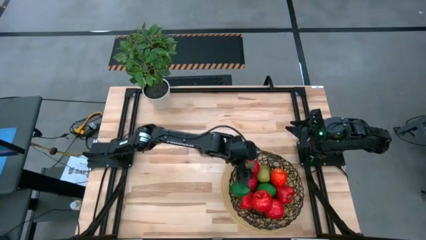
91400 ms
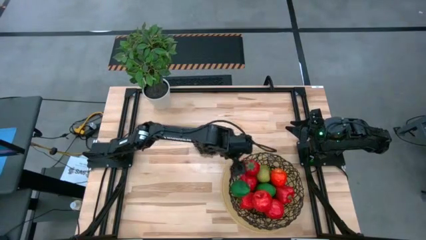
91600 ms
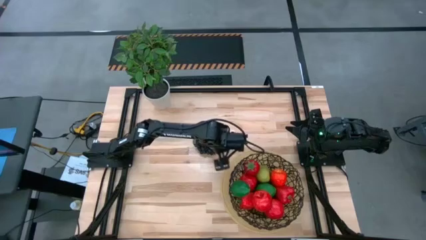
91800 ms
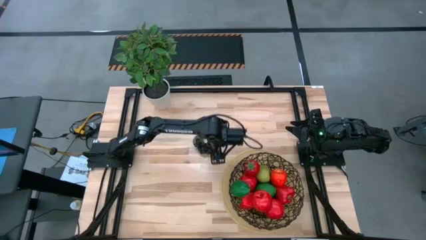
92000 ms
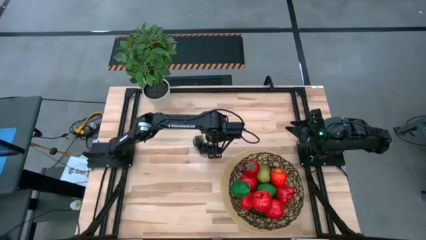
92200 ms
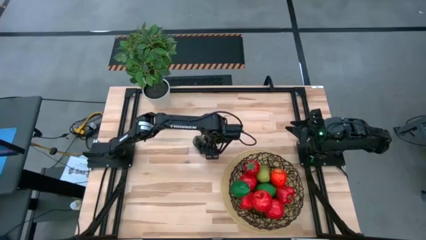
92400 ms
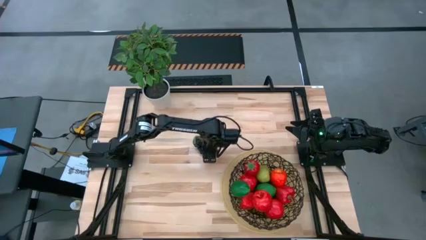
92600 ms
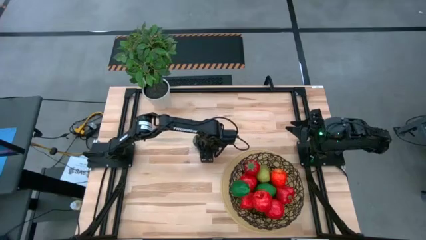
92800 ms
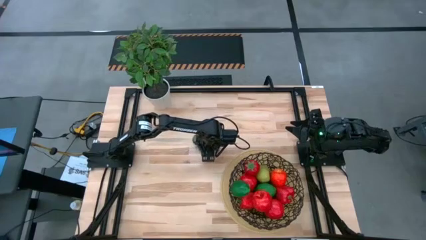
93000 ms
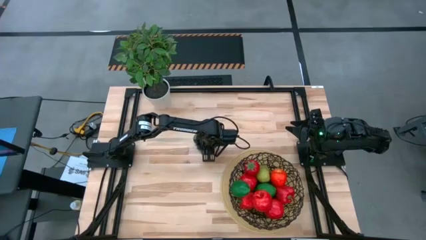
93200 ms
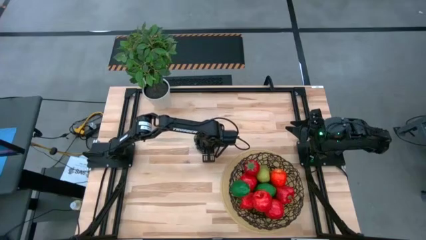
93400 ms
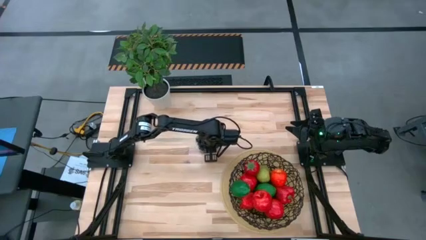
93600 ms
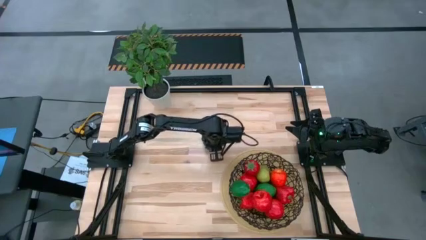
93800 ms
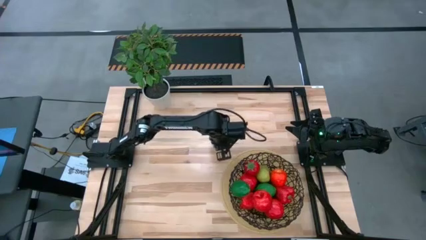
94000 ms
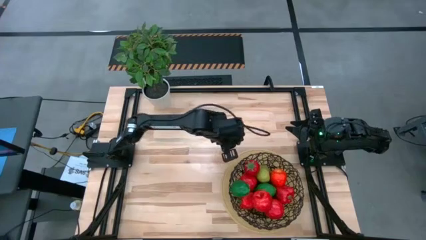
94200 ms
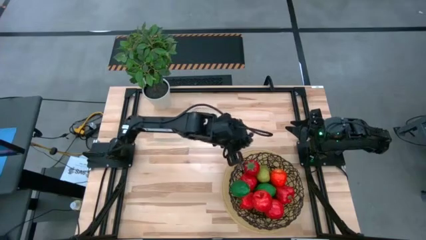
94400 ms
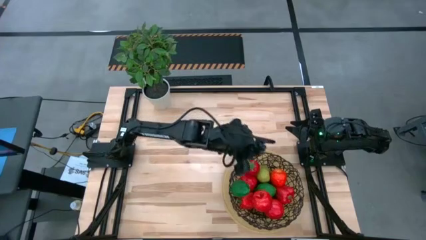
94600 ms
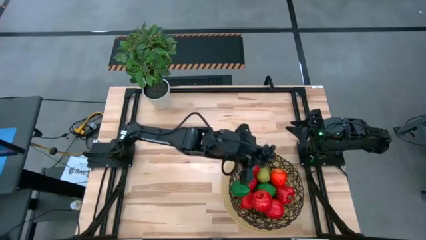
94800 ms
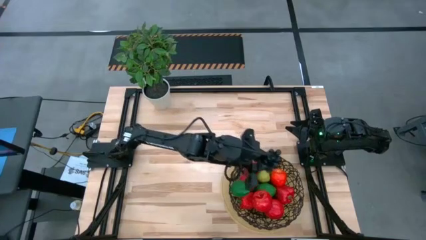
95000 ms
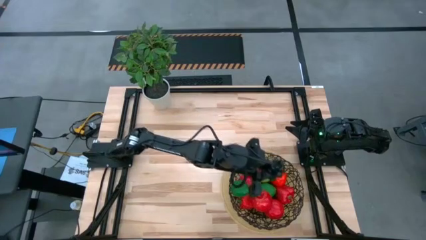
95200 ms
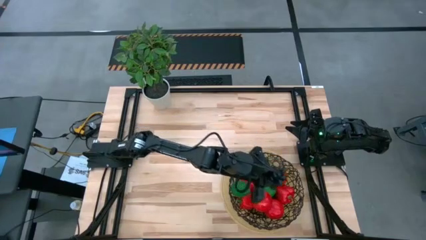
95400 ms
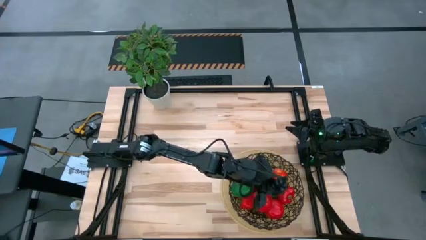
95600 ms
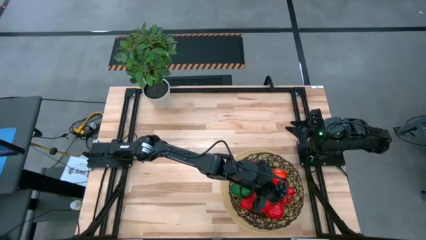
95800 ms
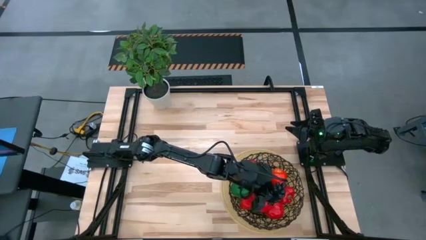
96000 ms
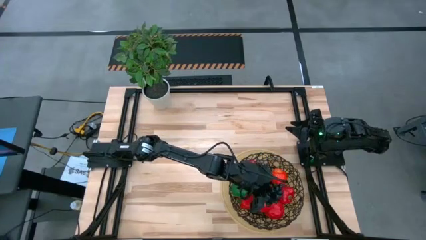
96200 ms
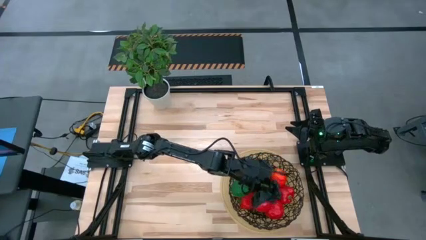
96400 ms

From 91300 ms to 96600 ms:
Task: Build produce basket
Put the black grapes into the black wire basket

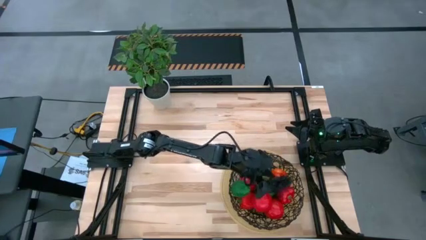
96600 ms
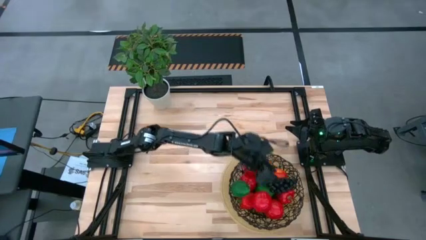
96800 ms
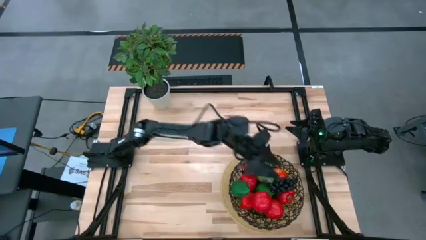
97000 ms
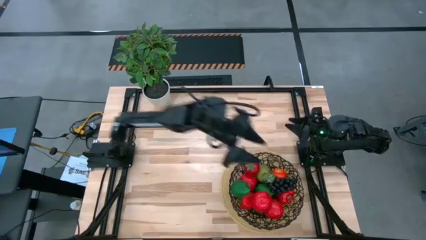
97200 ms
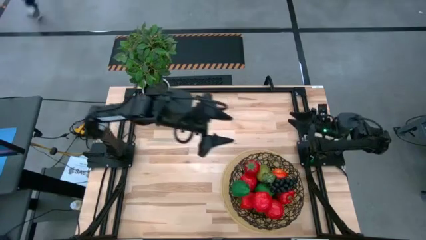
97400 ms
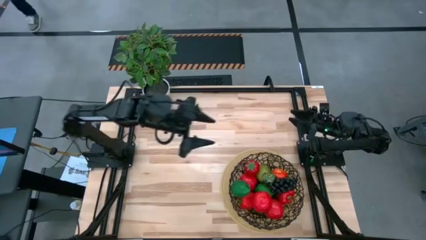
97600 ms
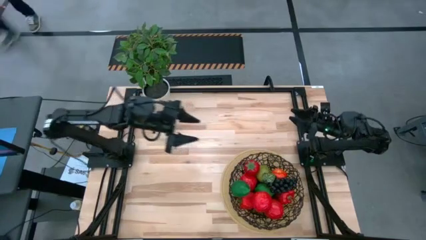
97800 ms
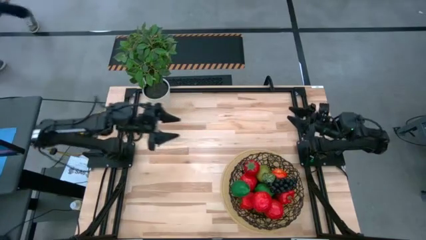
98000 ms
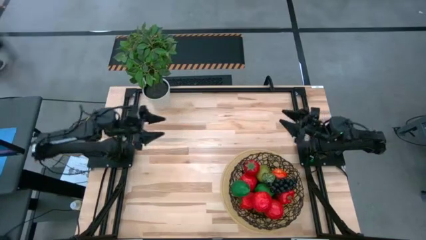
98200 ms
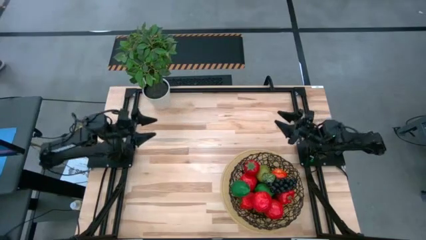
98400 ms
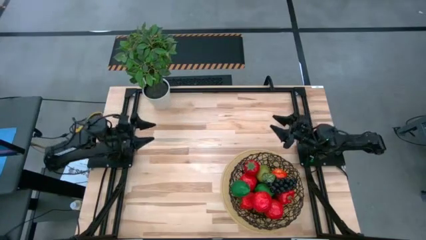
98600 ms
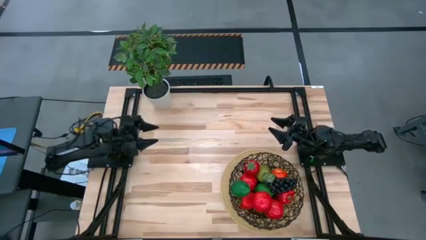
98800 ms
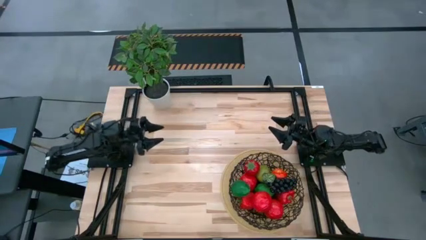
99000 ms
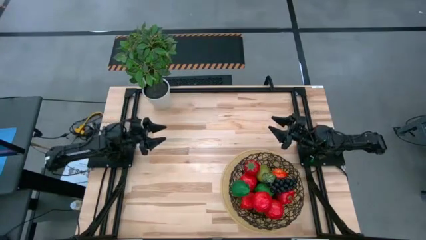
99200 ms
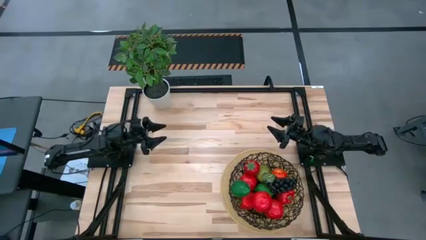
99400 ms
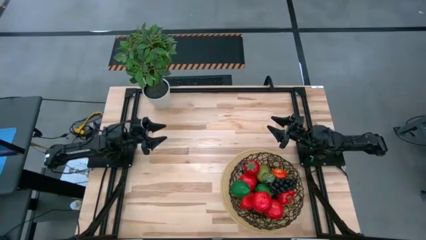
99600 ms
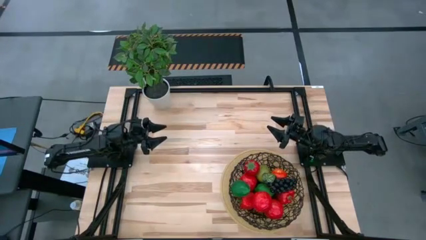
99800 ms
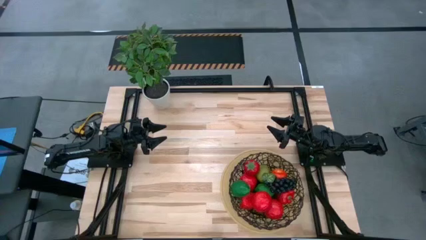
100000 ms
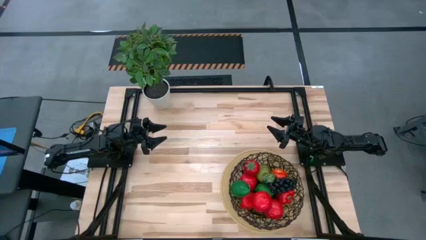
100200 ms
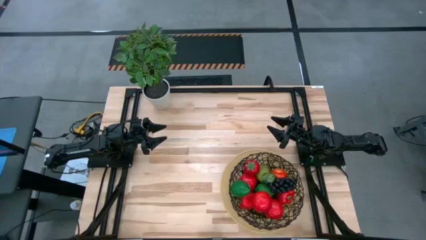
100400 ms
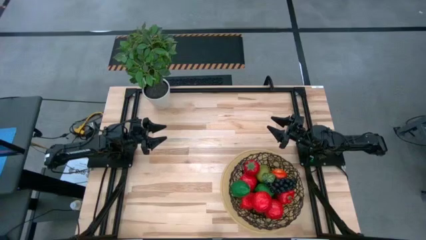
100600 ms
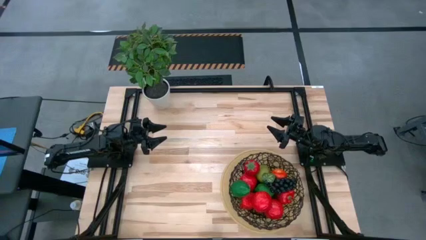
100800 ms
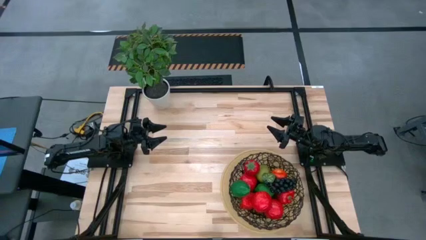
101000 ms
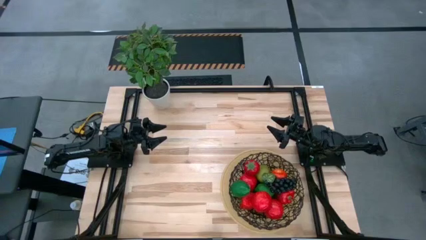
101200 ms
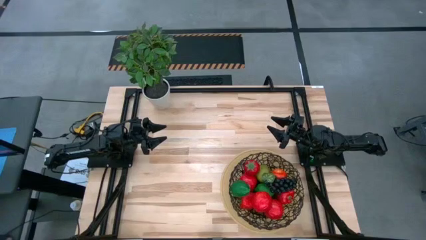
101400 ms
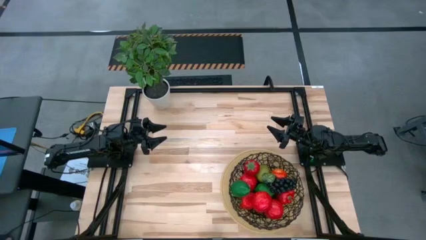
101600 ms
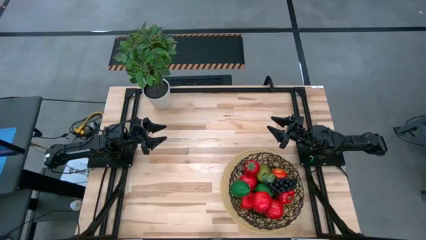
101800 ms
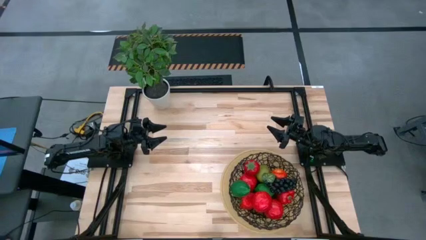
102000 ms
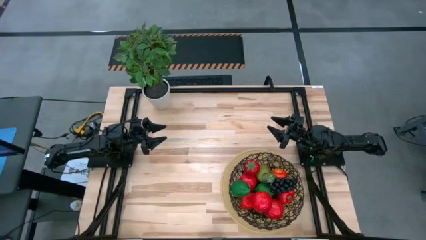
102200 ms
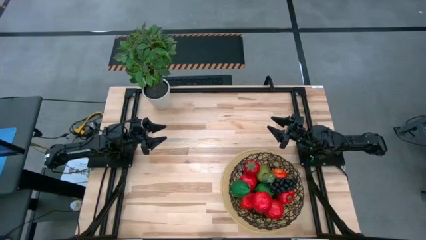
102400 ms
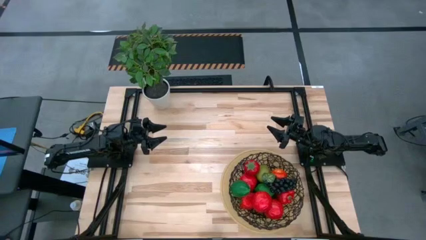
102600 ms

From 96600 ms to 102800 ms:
Return to Home Position

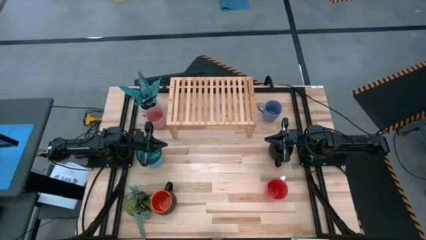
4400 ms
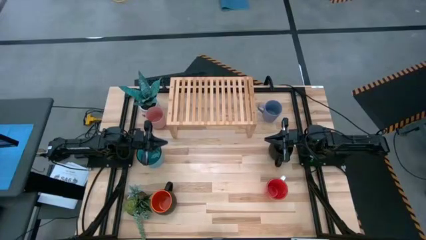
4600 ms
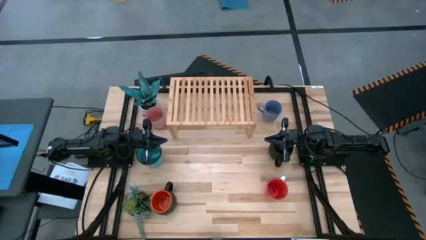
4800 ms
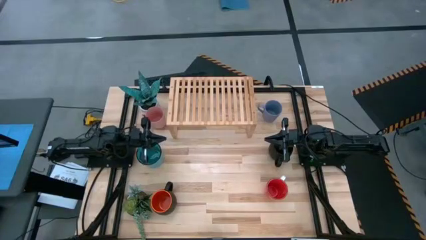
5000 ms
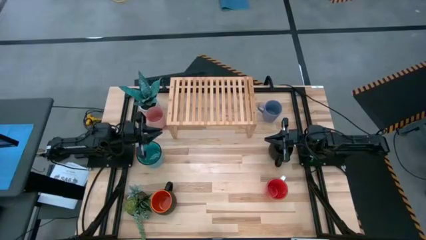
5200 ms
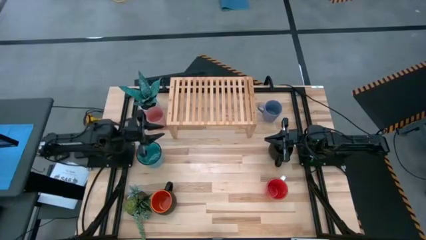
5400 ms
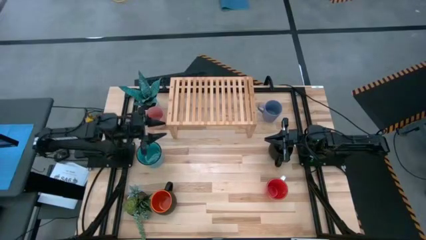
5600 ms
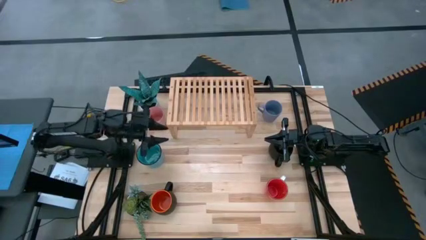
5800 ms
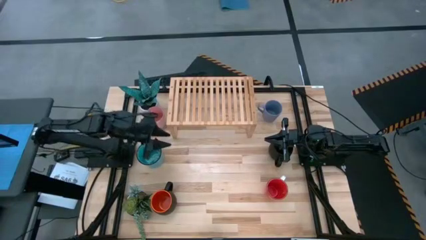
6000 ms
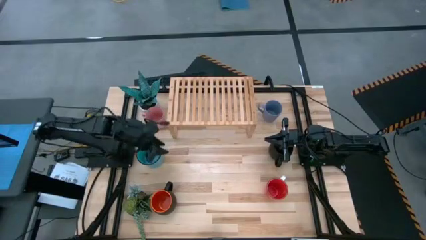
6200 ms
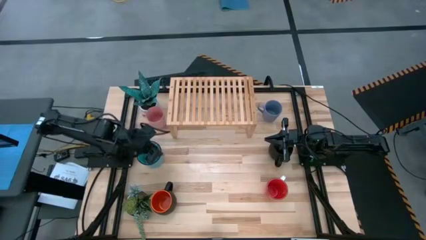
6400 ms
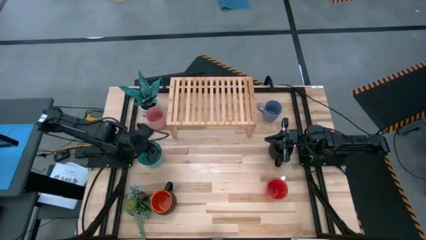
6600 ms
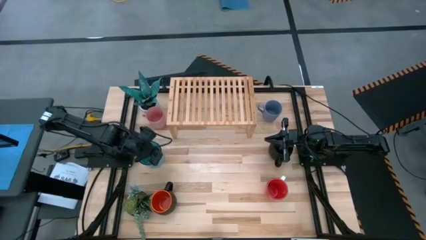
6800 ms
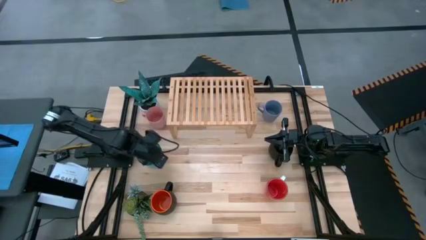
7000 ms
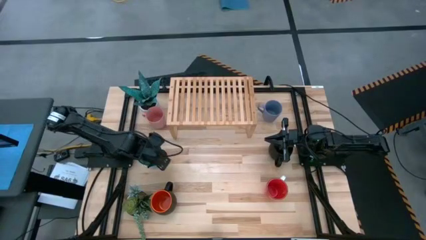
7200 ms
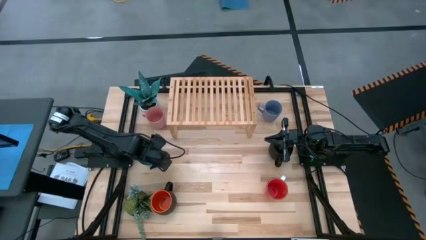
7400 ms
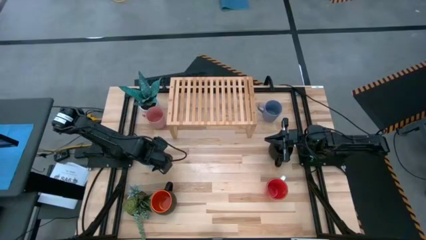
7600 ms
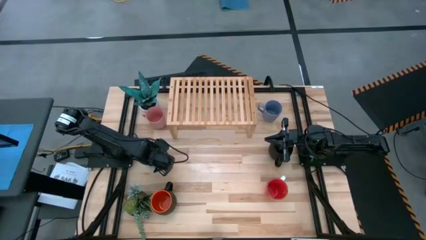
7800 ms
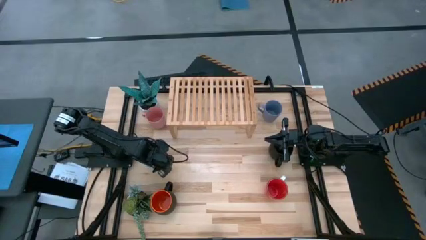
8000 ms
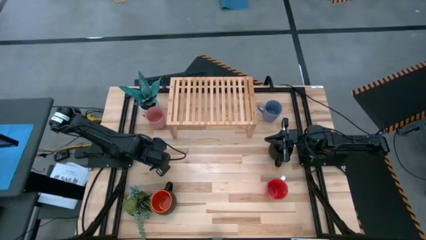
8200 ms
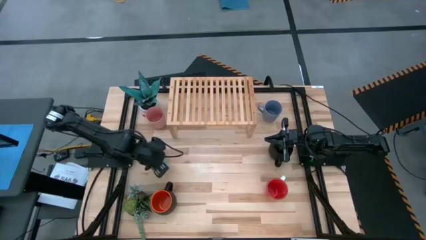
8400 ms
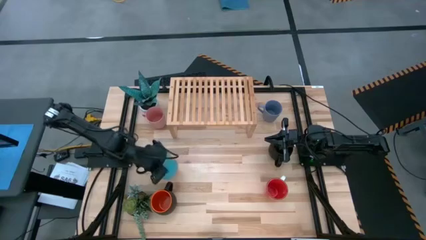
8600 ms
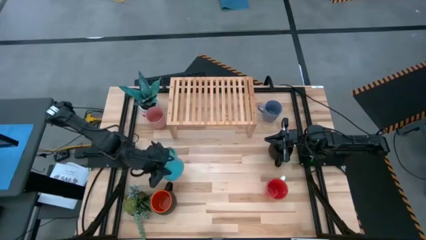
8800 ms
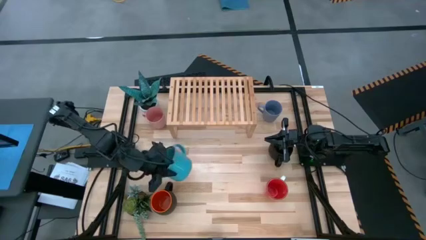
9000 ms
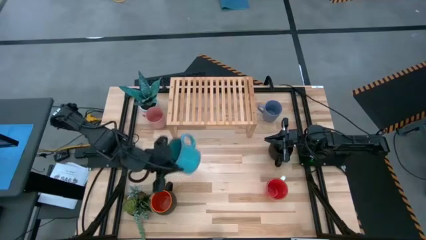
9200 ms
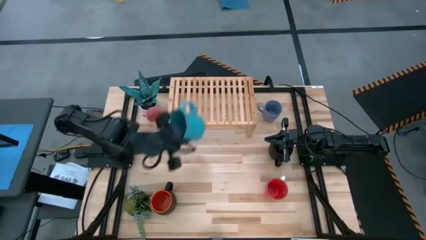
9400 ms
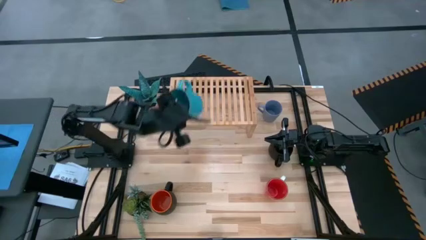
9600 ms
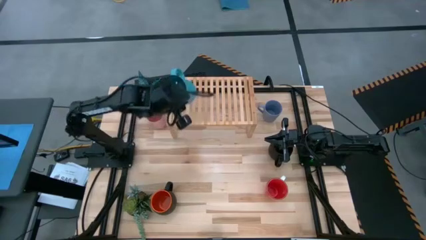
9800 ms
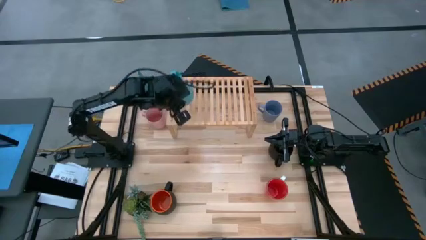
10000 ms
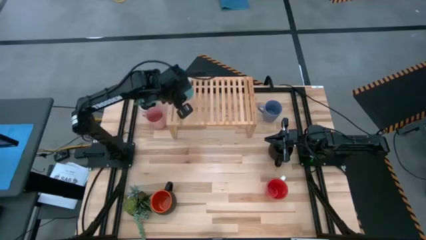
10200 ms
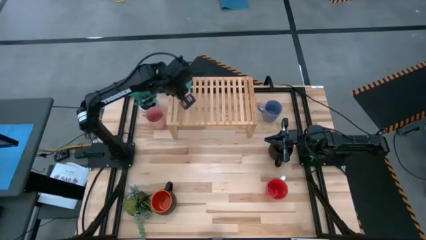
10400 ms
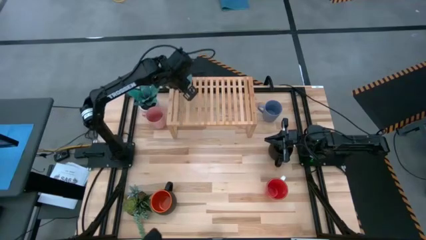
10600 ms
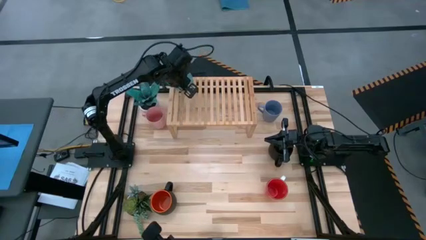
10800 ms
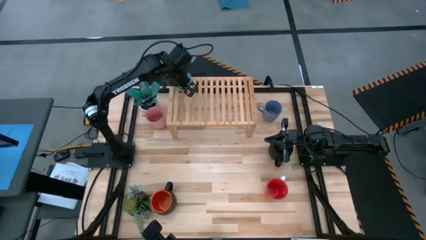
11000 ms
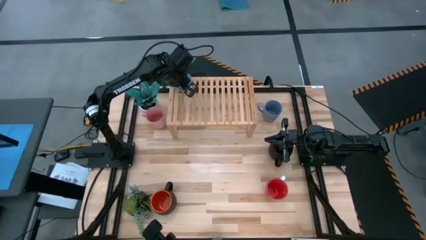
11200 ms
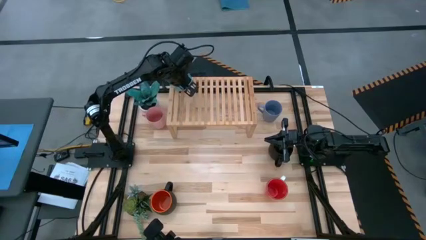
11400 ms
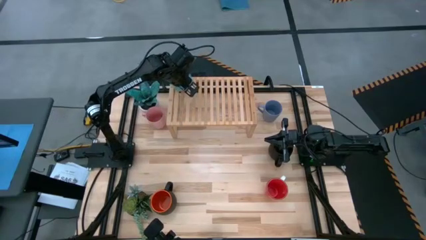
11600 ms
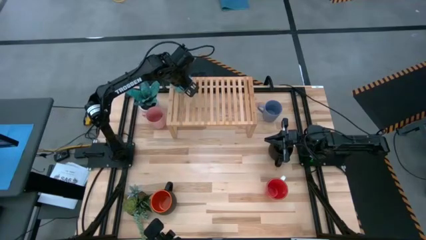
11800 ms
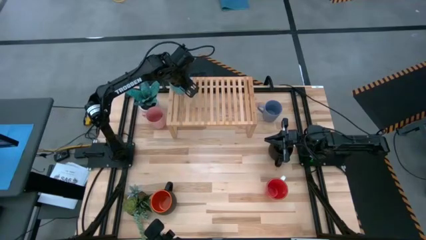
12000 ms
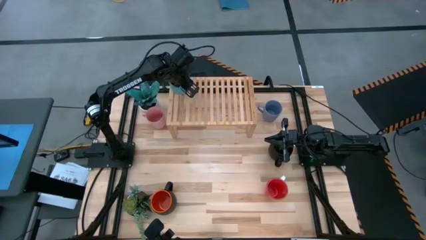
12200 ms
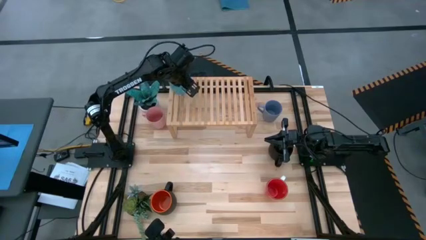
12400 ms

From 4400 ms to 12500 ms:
Task: Place coffee mugs
Put the dark green mug on the shelf
